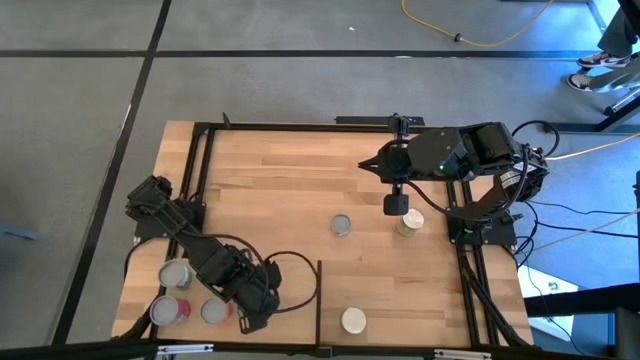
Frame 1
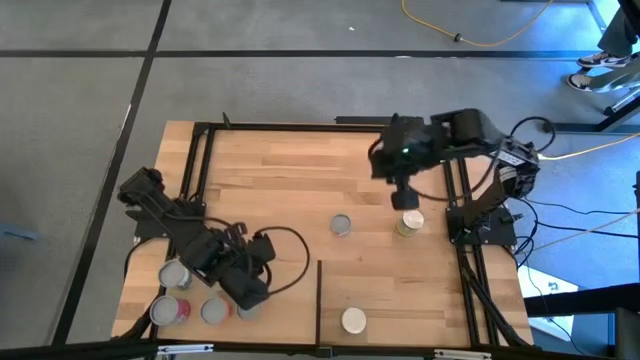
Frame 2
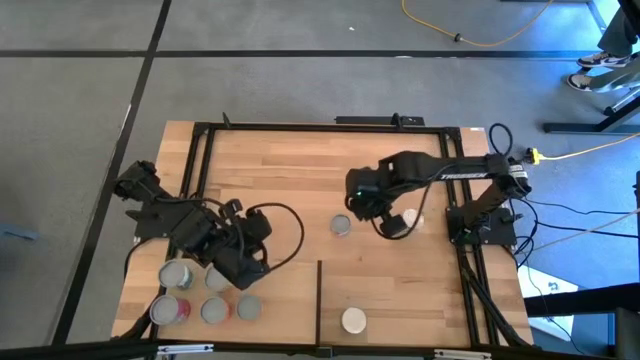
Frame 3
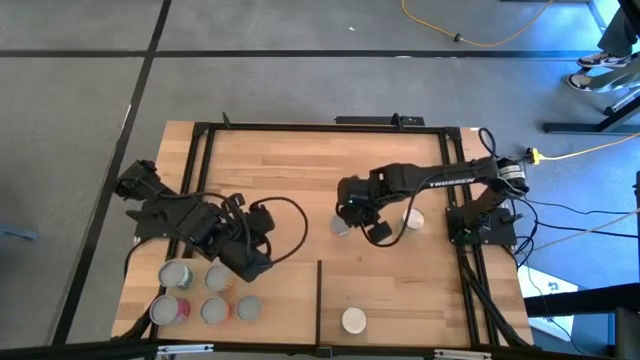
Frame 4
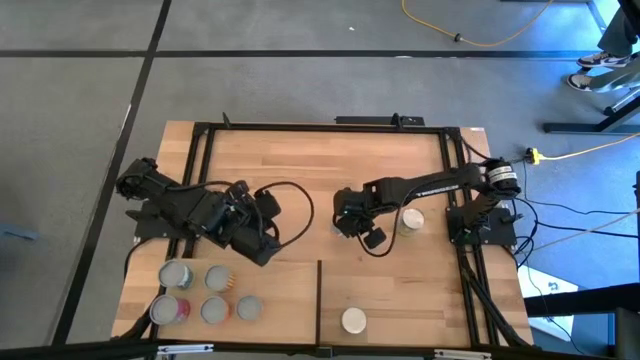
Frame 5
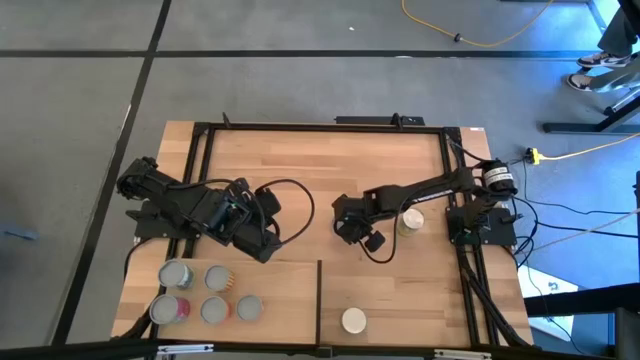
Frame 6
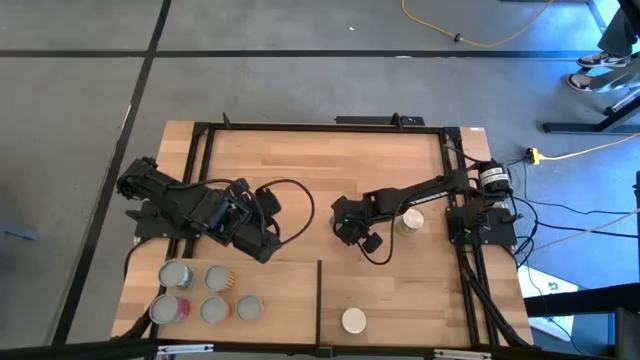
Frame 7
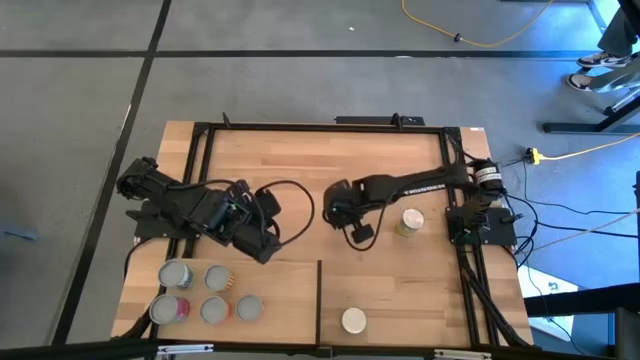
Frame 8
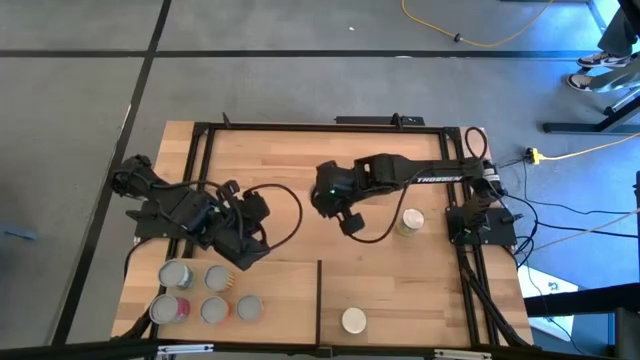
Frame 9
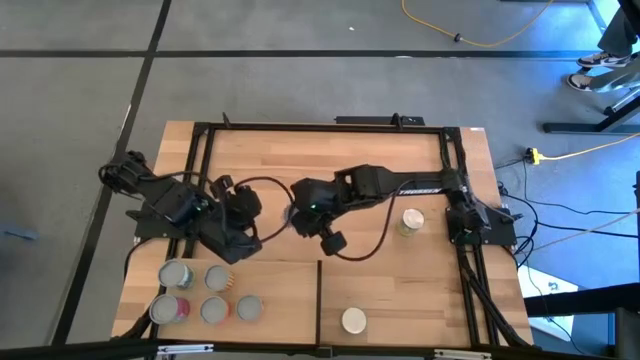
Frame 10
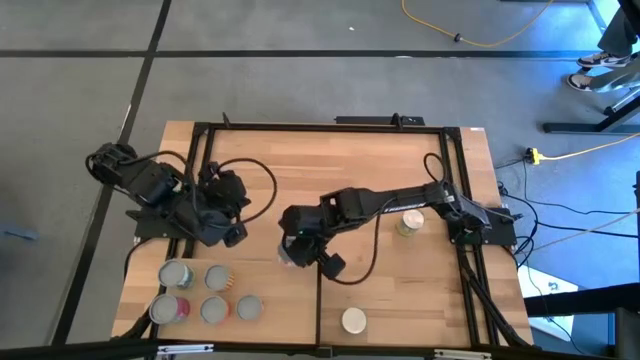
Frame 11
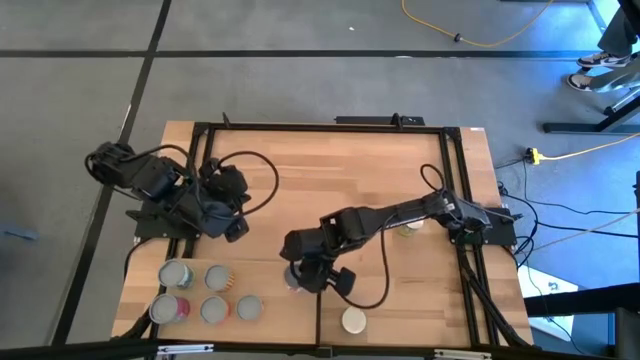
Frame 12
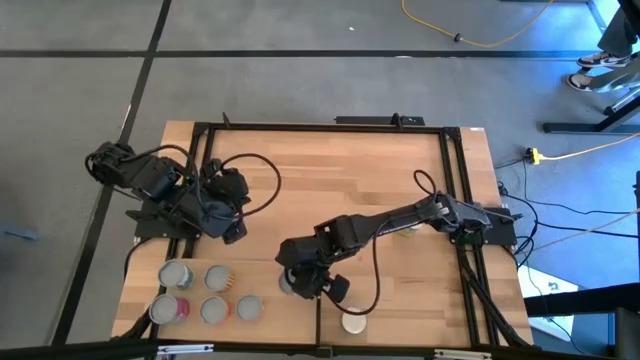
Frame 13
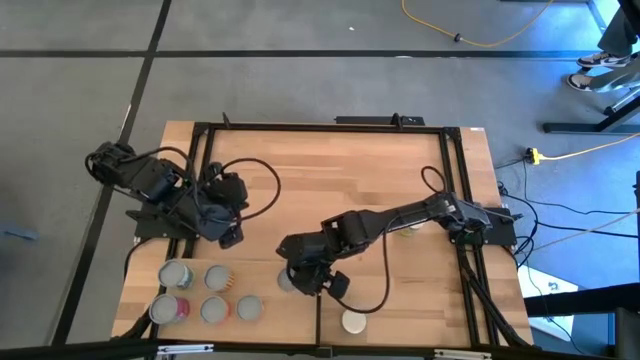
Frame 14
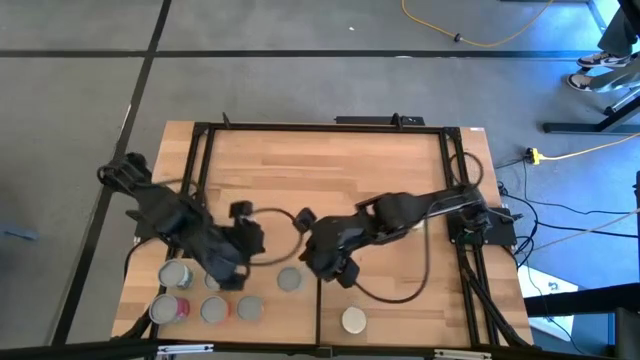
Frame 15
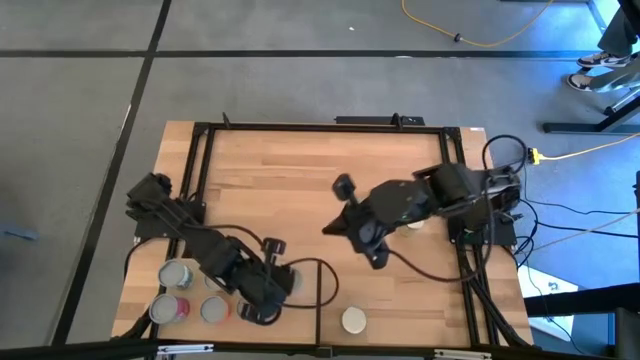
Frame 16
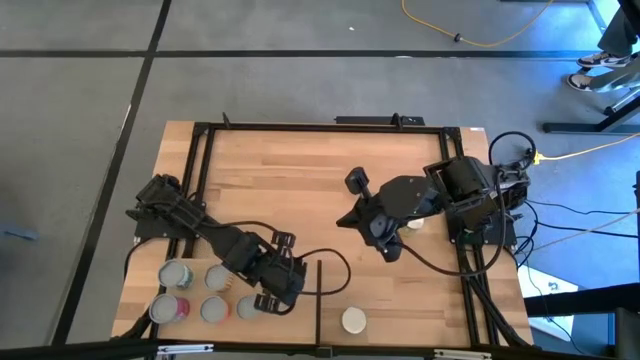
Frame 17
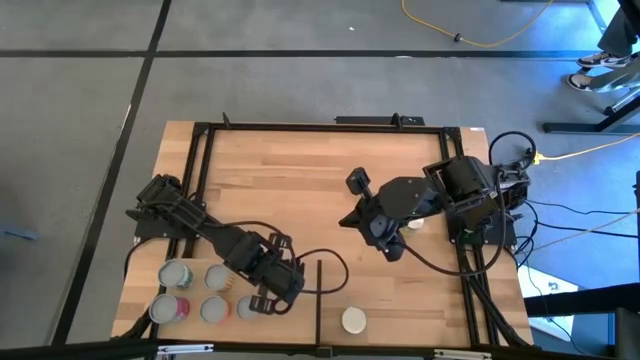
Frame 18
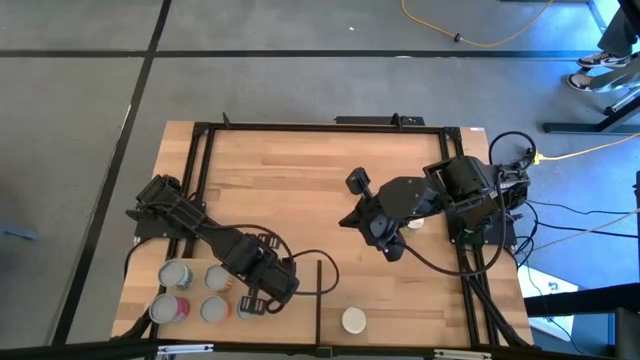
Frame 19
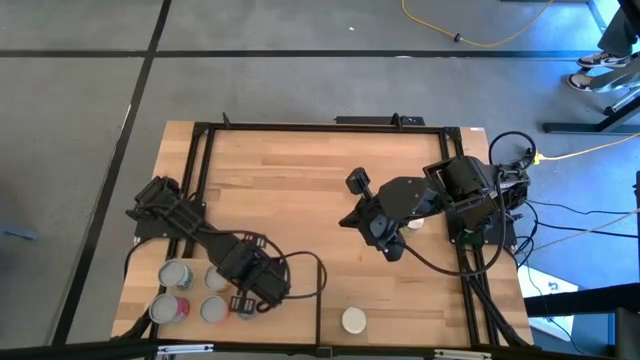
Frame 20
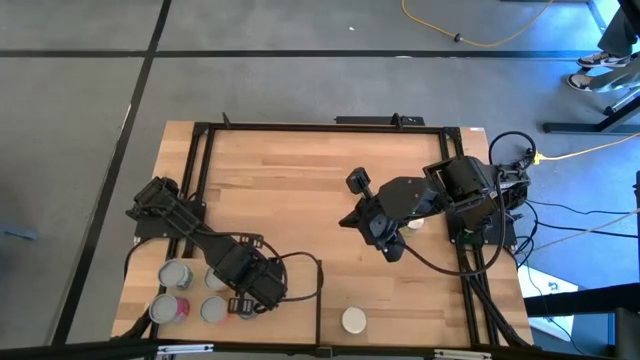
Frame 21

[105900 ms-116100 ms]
Task: Pick and place cans onto a shelf
Put the canned tuna on the shelf

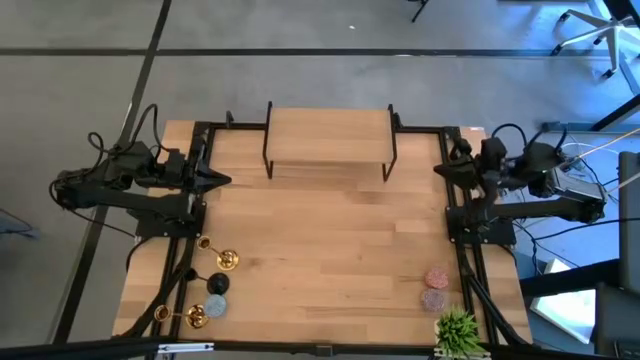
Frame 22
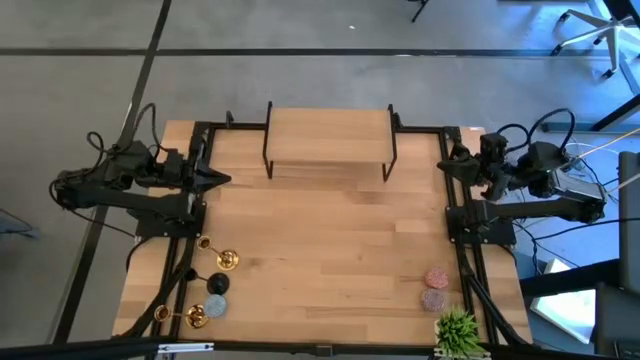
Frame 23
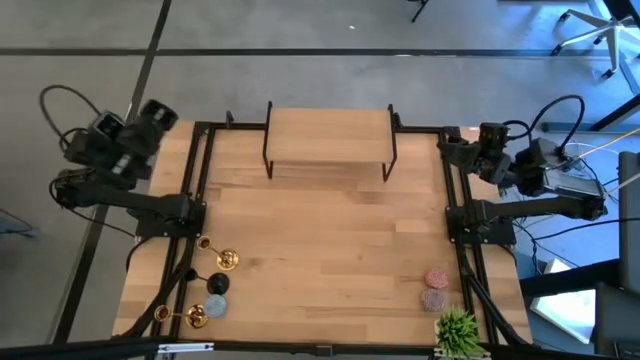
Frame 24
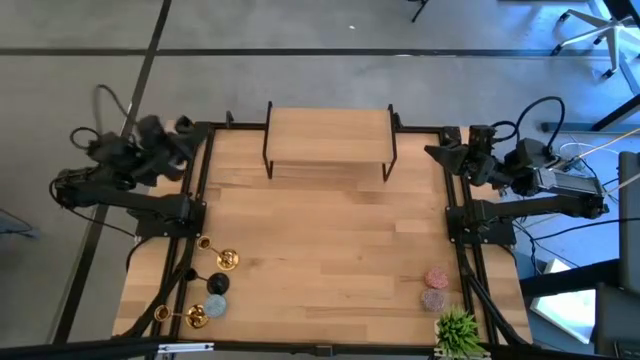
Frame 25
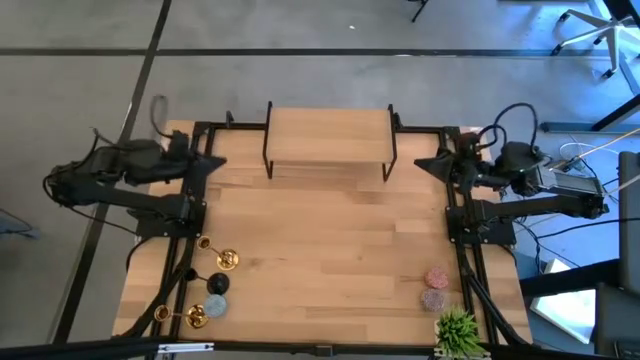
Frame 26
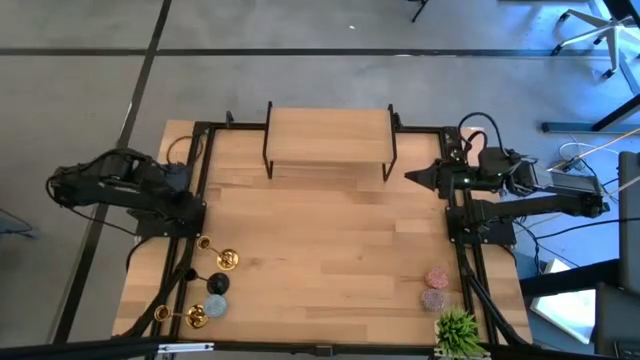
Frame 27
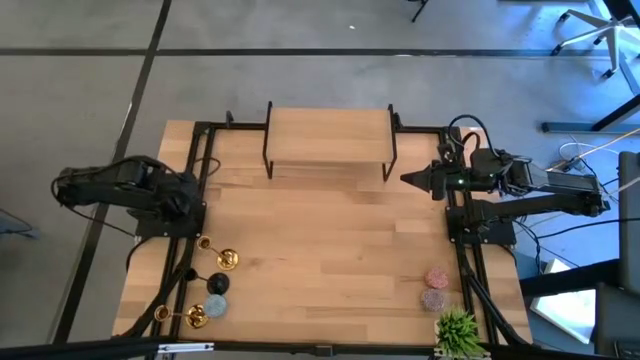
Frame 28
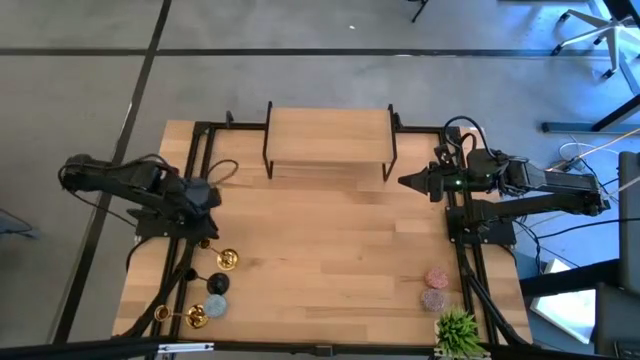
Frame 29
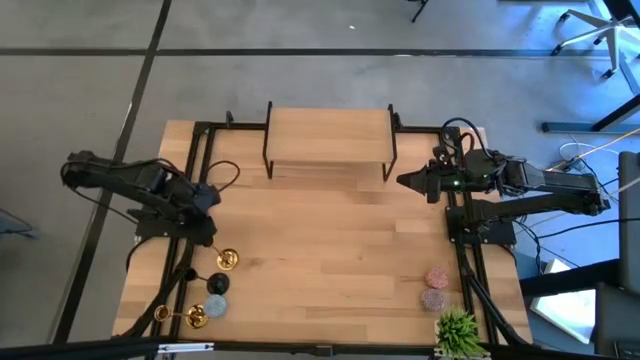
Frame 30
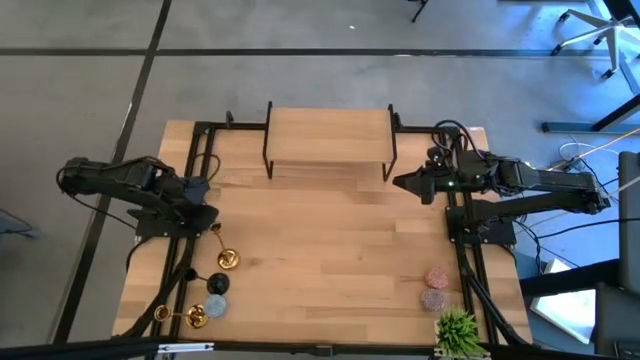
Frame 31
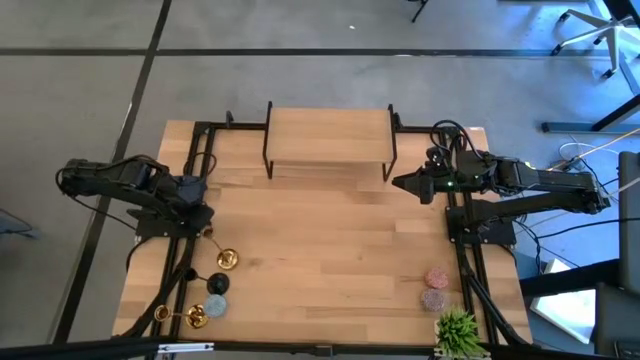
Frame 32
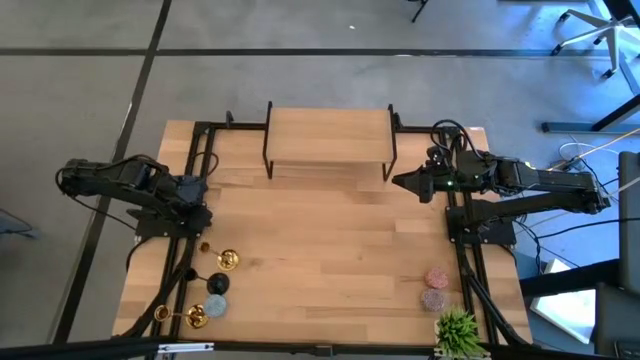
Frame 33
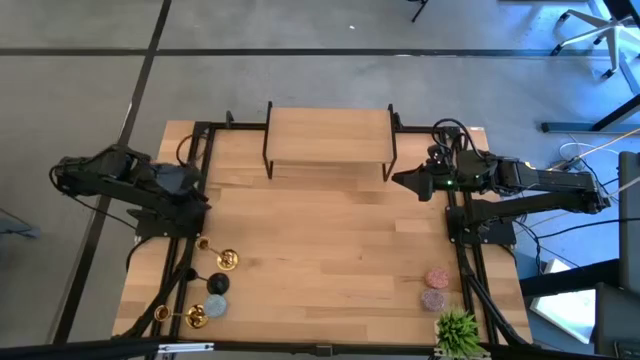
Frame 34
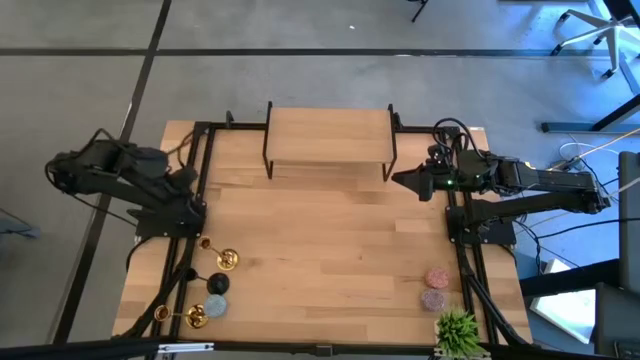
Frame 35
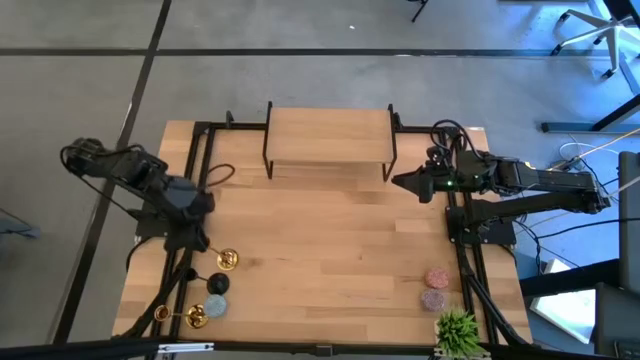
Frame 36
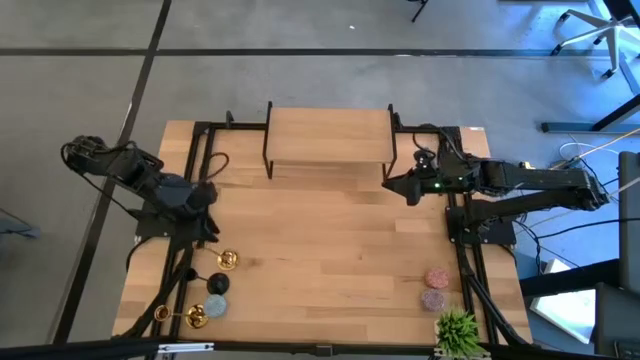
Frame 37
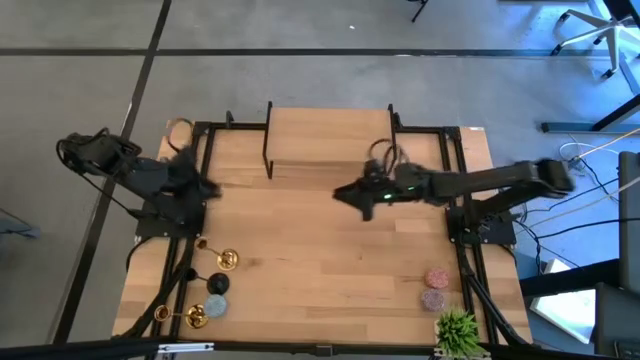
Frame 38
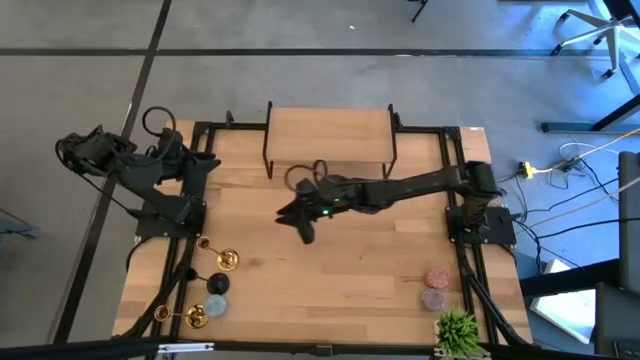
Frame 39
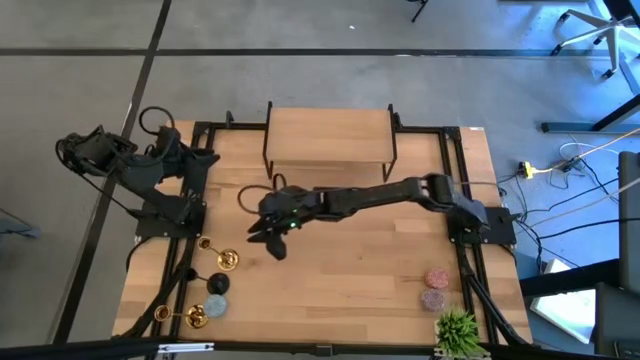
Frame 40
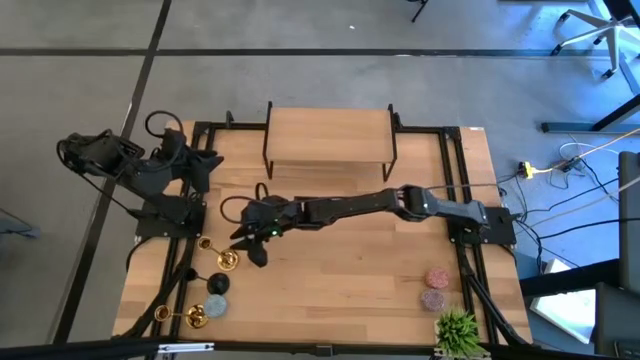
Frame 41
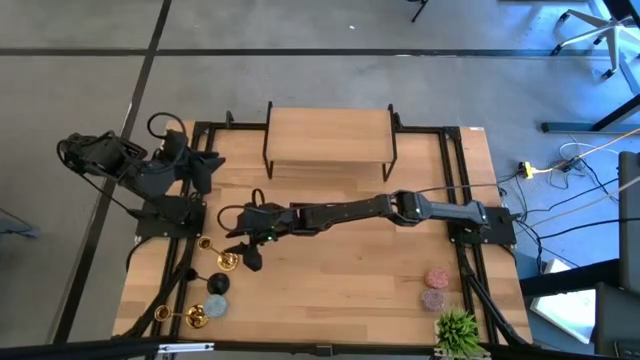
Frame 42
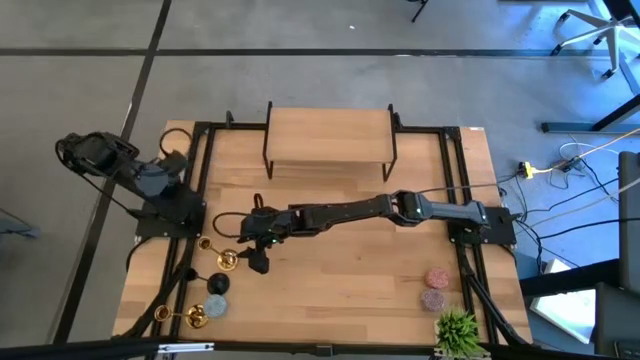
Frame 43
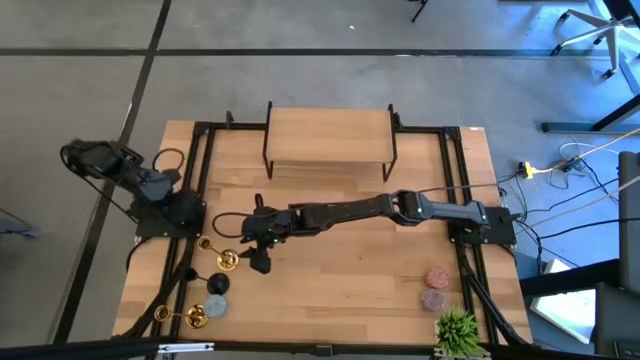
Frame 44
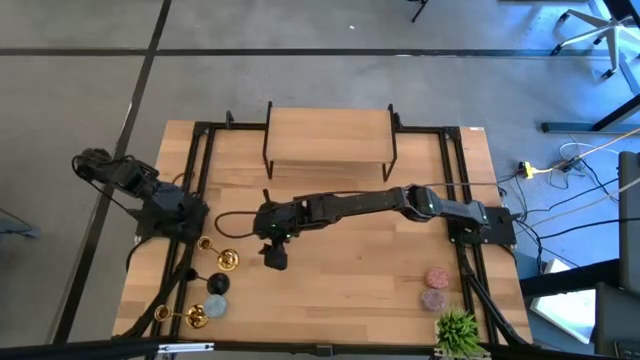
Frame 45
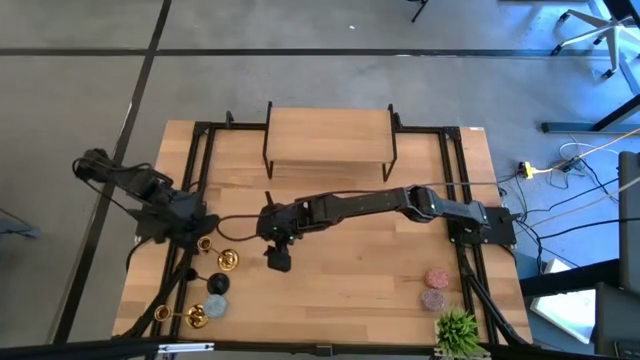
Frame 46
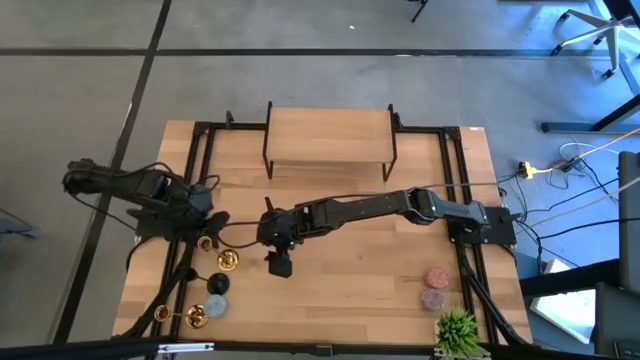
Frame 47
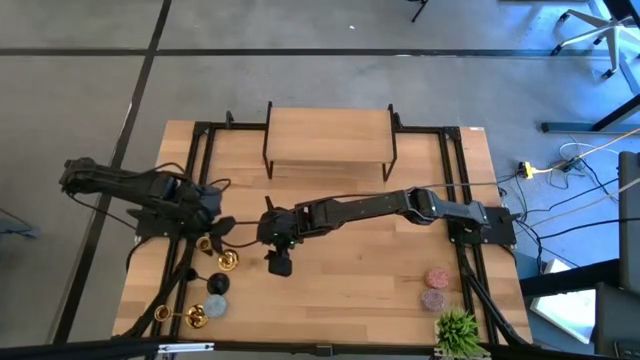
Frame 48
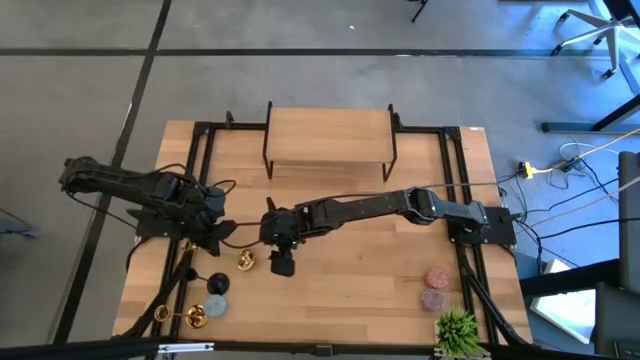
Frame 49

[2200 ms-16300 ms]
Task: Pick & Place candle stick holders
Put the gold brass candlestick on the shelf
